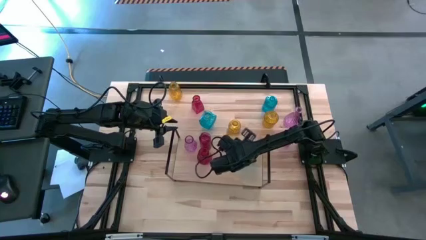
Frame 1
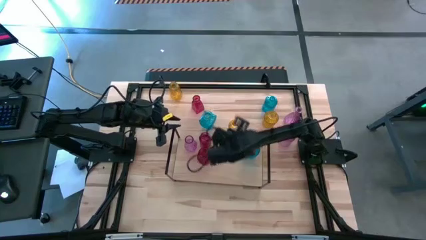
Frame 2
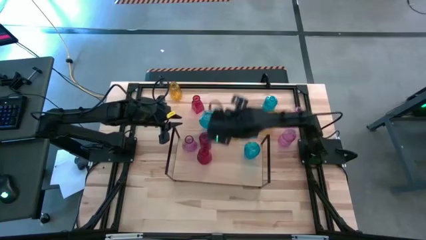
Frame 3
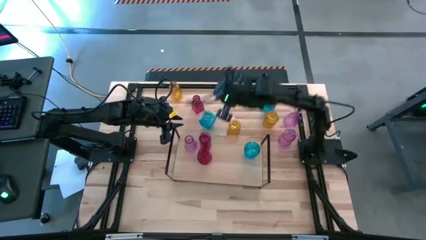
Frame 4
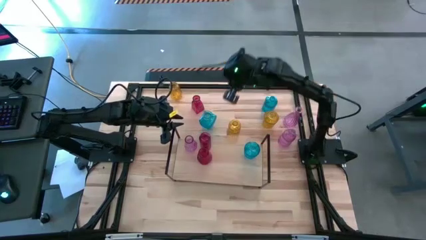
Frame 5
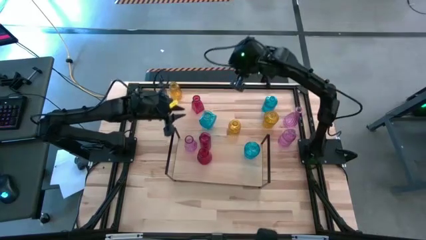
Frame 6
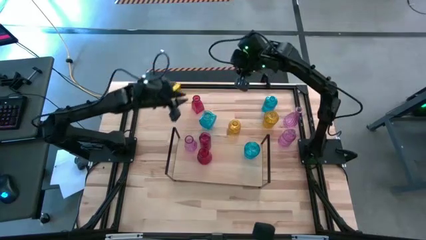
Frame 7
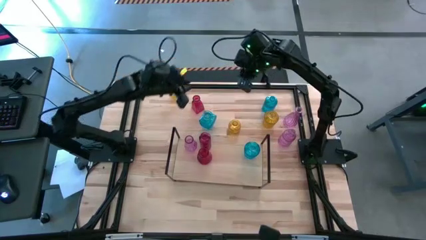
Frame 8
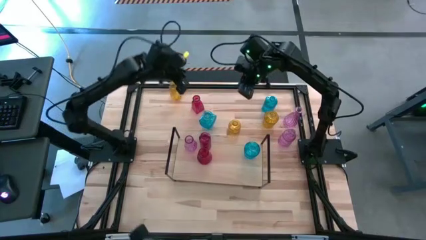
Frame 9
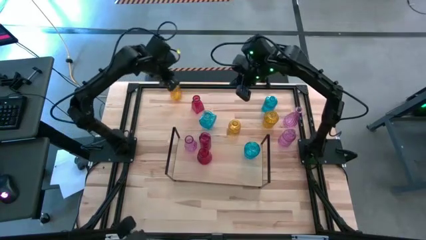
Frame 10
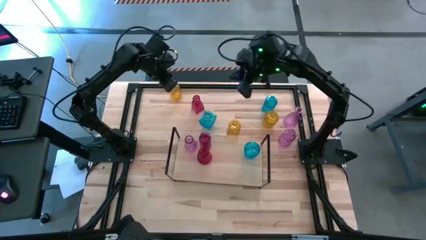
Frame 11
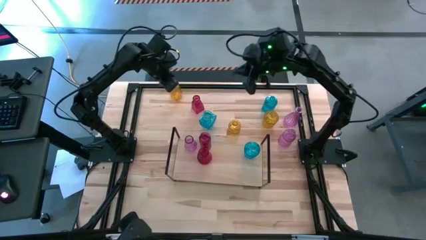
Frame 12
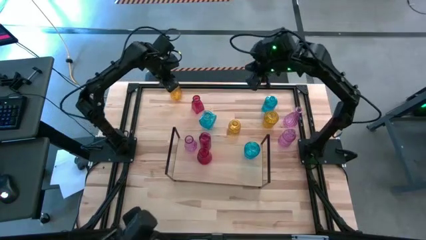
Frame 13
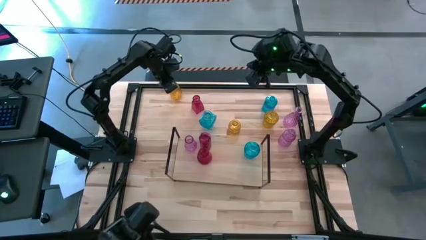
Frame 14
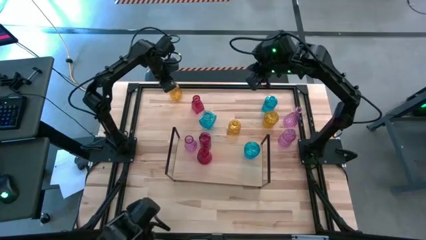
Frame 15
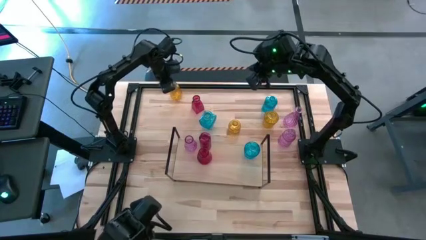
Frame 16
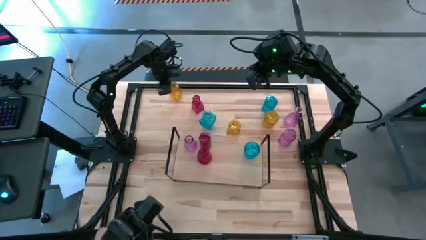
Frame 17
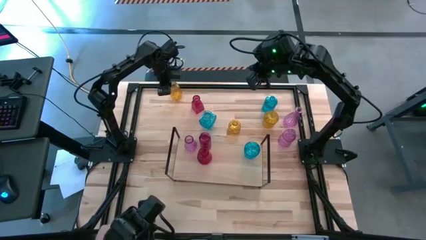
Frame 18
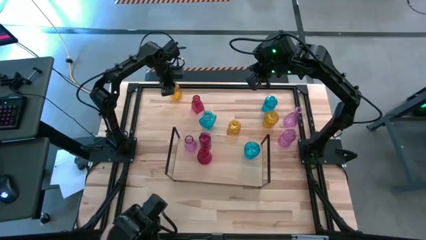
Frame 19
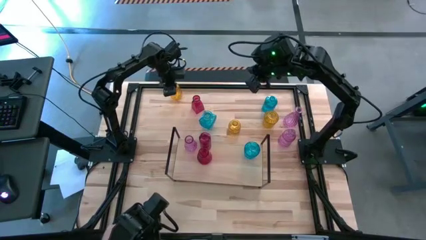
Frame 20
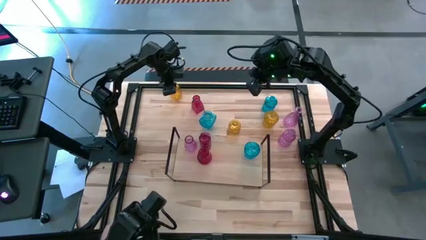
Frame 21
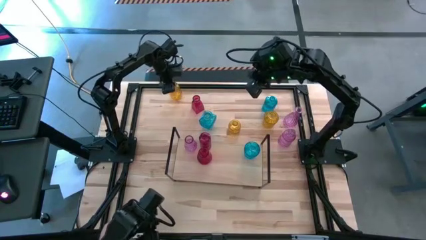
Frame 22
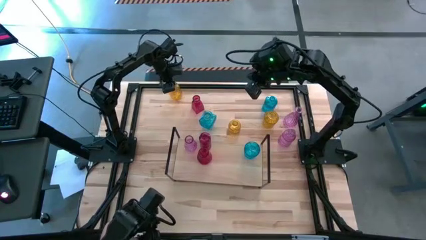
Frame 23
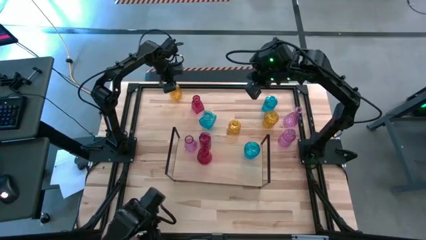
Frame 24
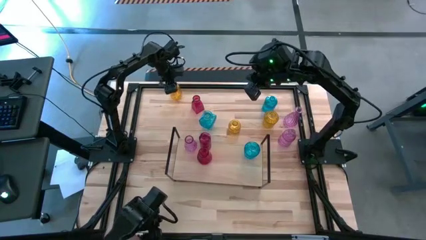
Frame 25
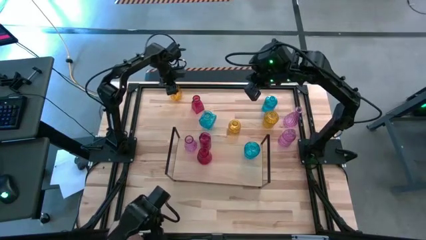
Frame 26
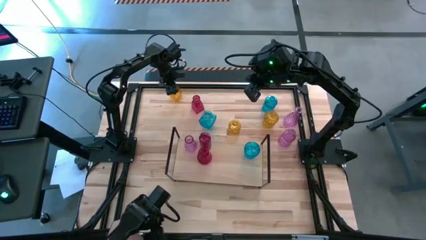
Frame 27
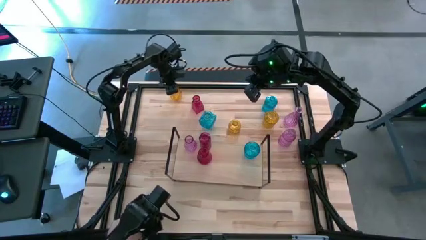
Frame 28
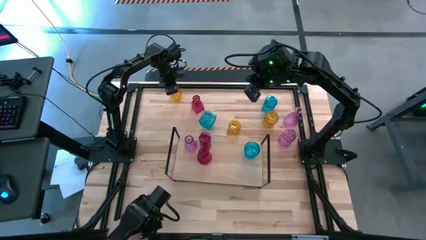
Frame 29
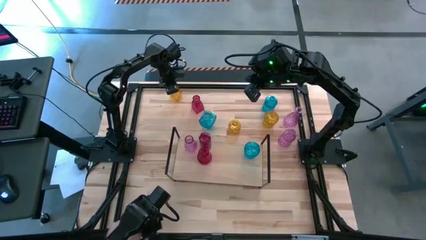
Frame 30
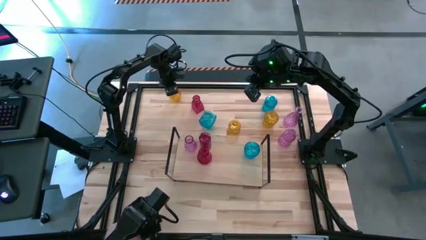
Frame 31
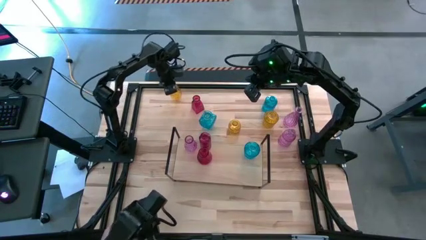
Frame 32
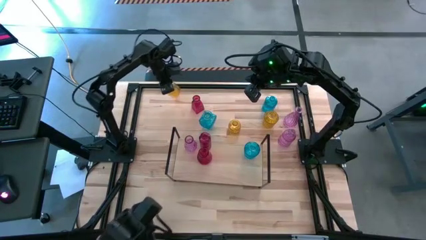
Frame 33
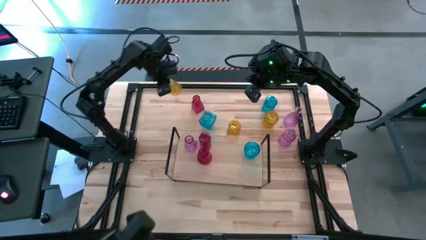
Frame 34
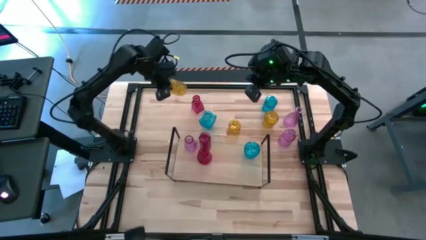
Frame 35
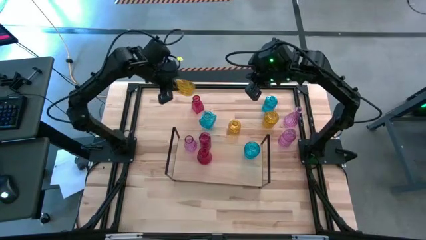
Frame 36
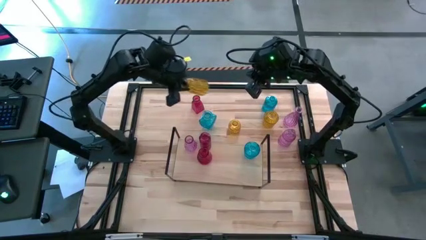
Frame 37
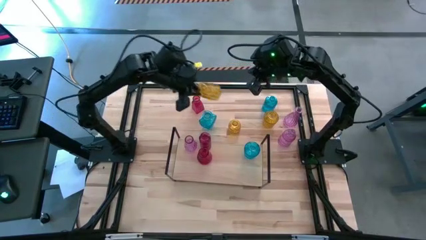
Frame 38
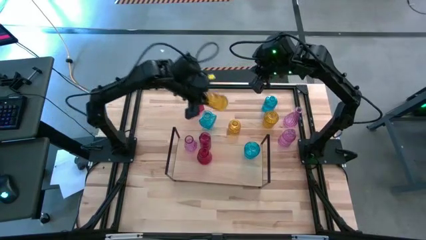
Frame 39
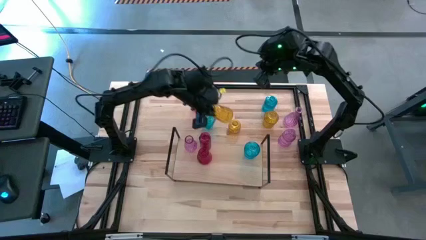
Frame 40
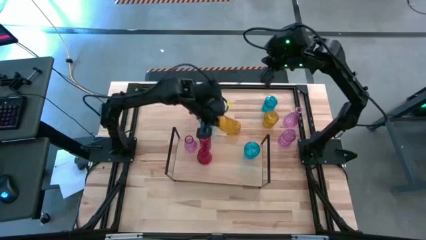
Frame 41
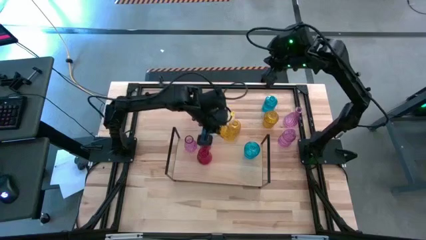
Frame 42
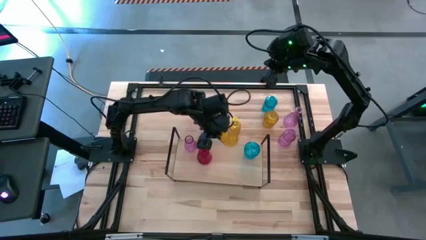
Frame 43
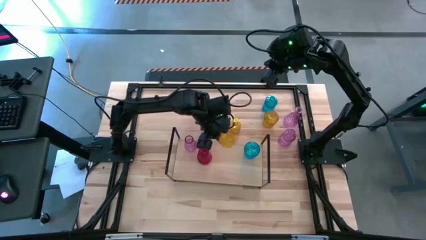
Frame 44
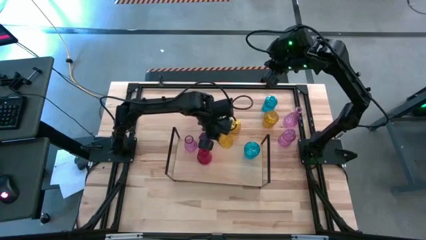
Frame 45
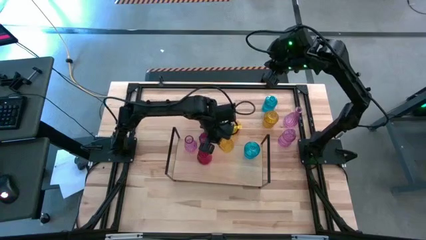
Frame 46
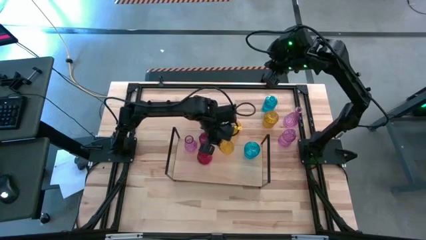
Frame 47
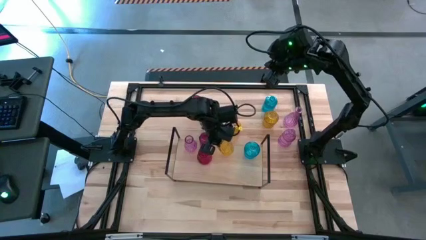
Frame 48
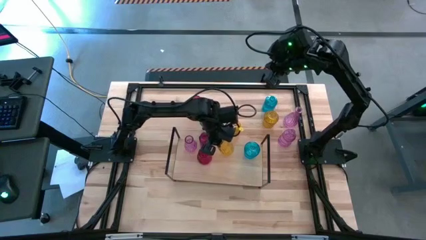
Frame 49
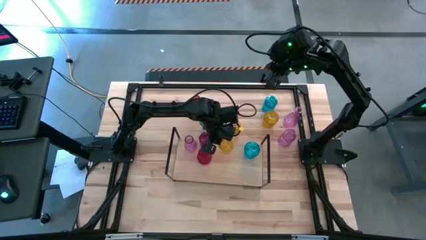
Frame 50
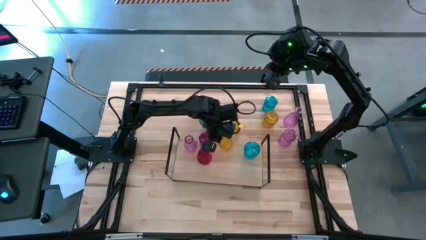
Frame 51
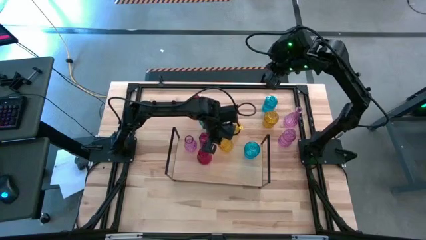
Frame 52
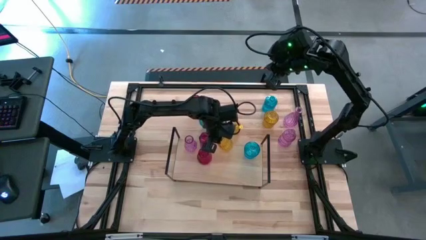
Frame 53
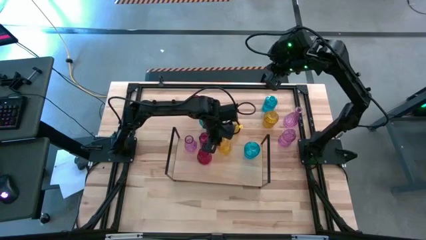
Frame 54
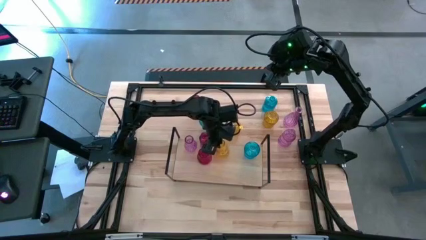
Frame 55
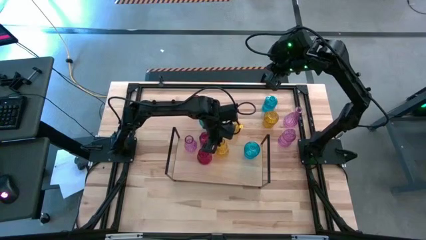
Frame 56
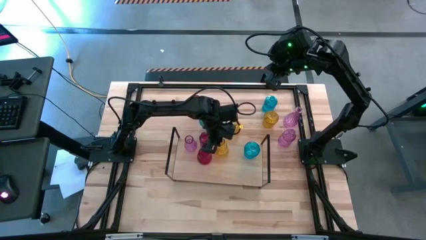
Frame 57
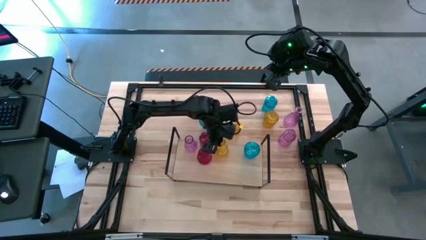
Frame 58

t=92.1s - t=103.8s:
Task: sort vases onto shelf
Put the top yellow vase on the shelf

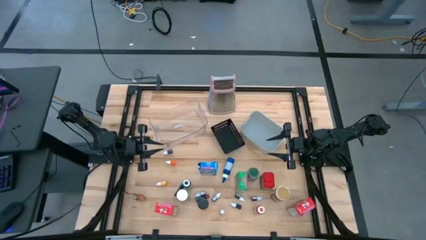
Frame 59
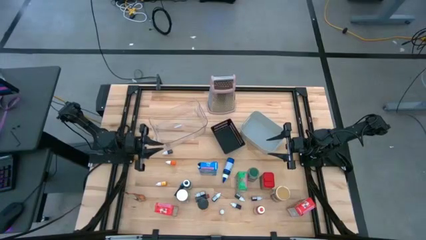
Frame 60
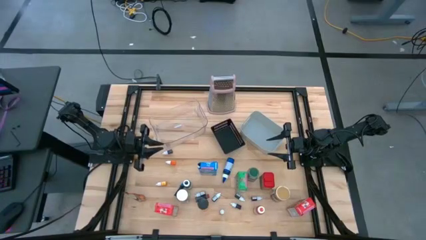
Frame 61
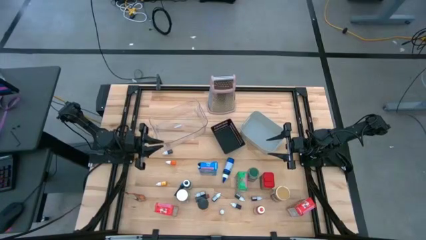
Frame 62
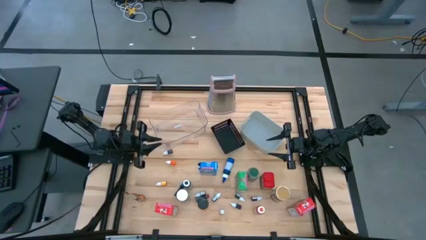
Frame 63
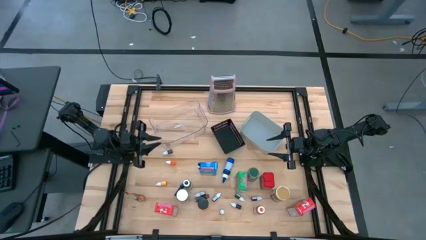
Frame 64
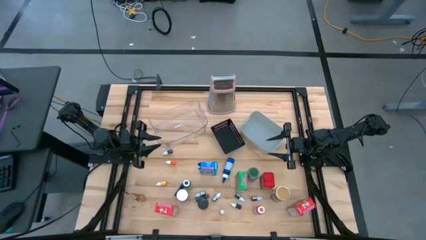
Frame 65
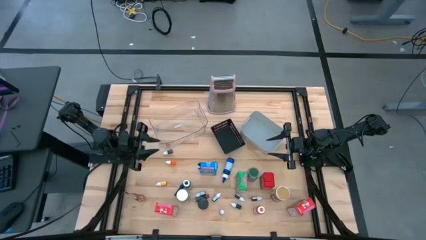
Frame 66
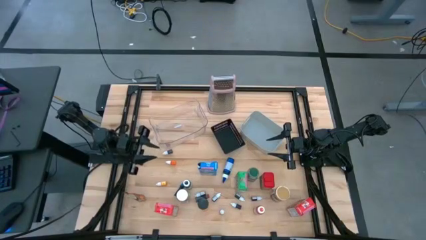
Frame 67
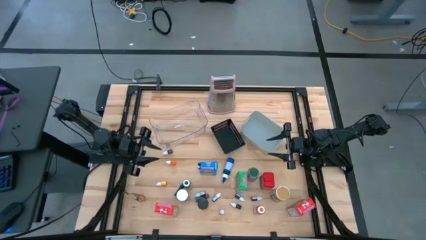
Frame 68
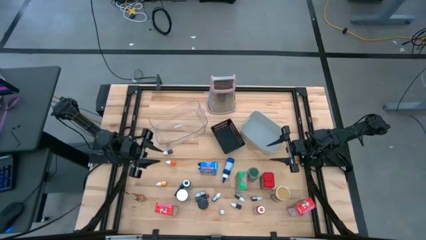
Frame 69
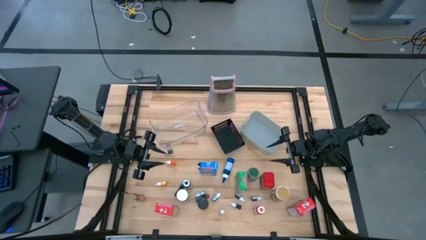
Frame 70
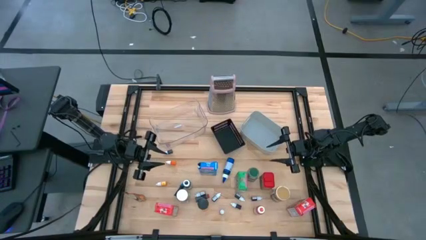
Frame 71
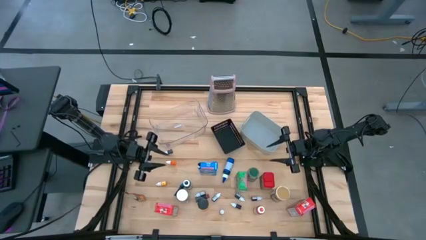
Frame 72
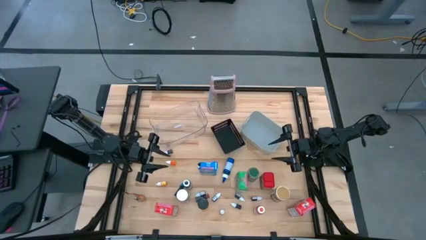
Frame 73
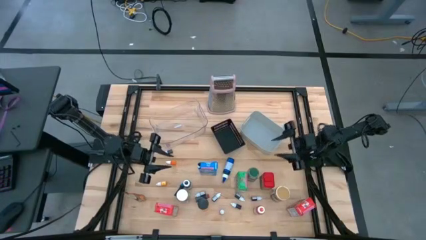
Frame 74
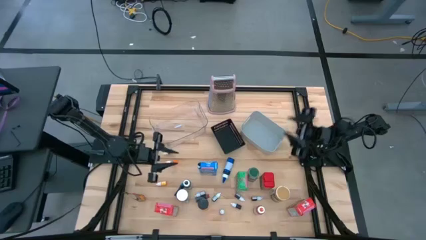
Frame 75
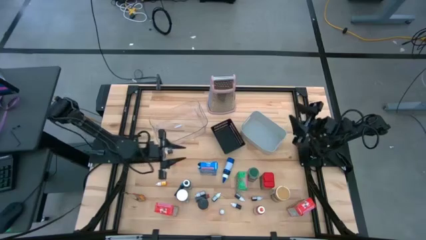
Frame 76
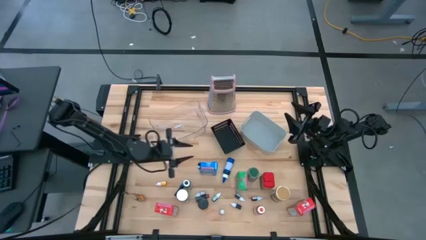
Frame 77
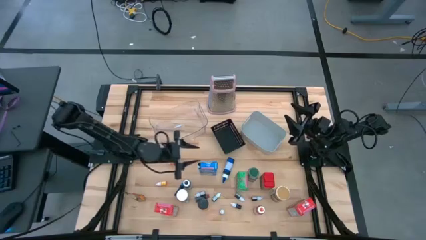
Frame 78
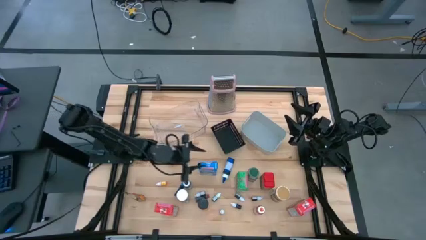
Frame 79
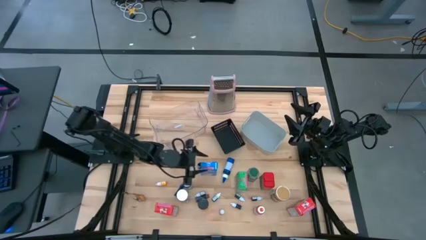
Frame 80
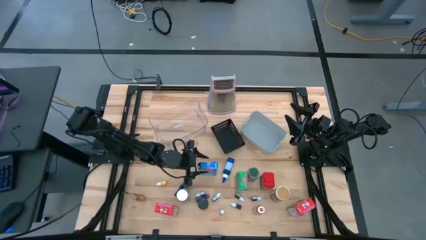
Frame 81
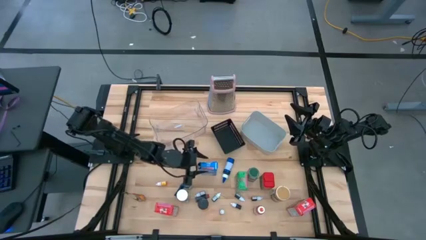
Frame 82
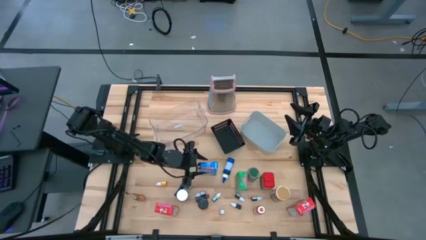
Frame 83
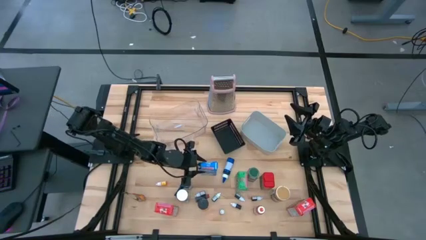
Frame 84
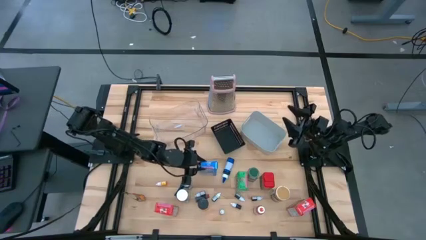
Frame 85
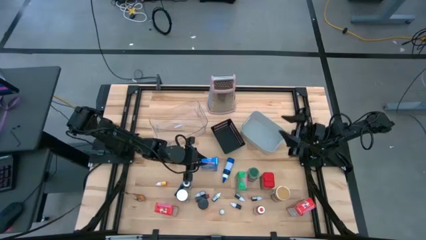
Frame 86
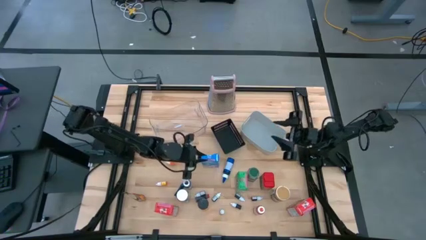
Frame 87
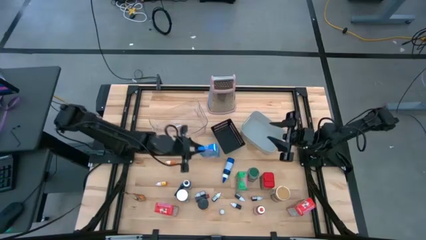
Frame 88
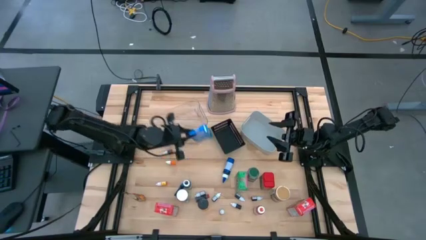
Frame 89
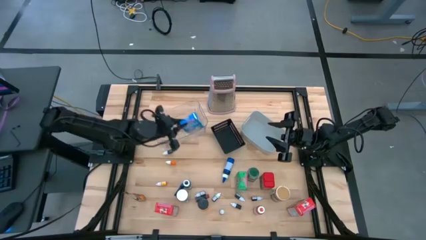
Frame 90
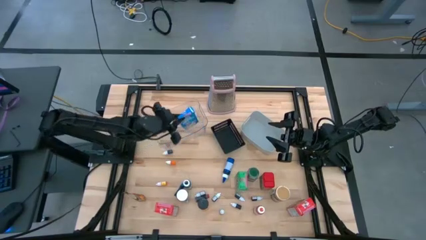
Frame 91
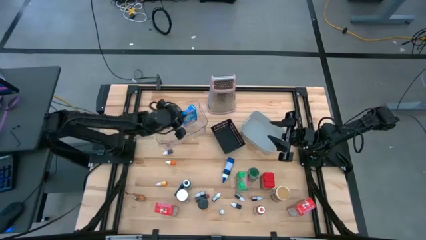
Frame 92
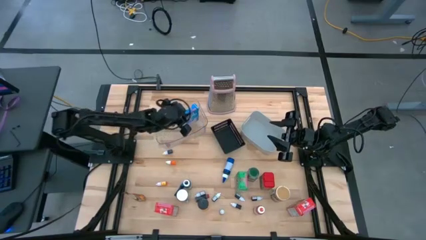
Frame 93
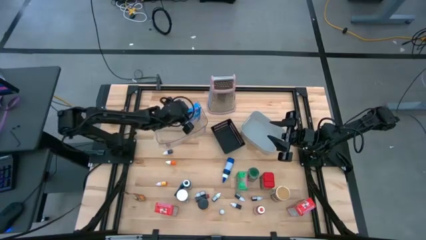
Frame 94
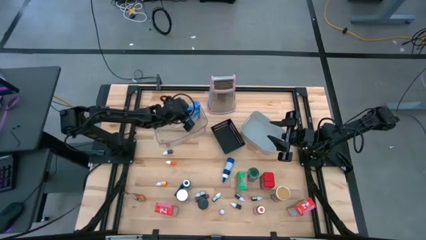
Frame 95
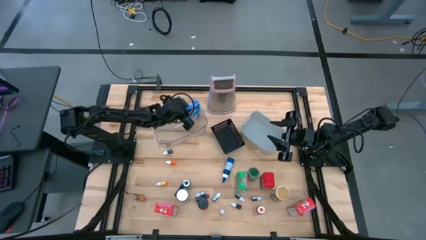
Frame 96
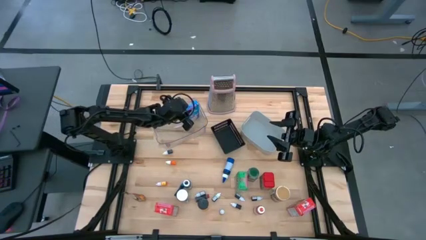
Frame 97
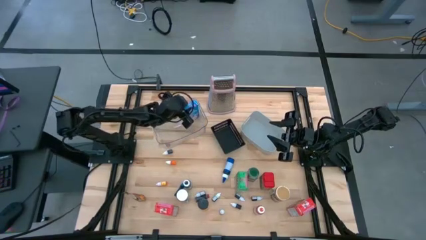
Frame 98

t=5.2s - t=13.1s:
Task: Pick & Place Kitchen Items
Put the blue cereal box into the transparent bin
